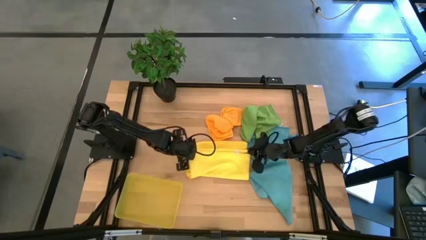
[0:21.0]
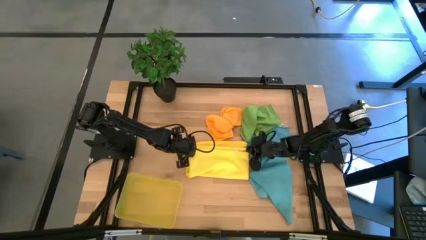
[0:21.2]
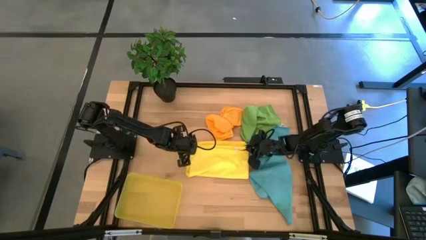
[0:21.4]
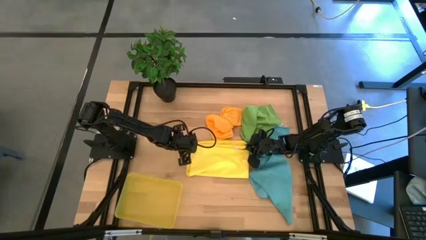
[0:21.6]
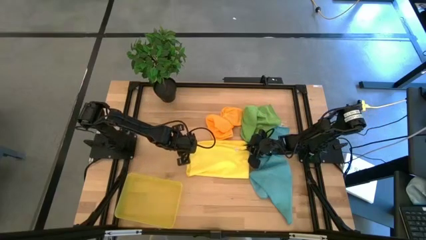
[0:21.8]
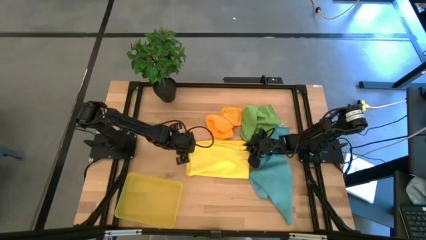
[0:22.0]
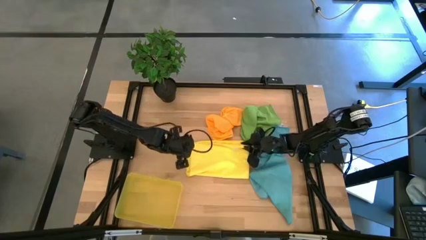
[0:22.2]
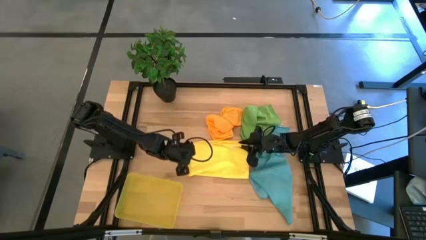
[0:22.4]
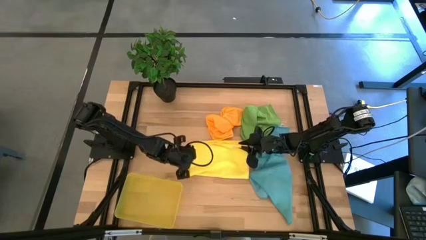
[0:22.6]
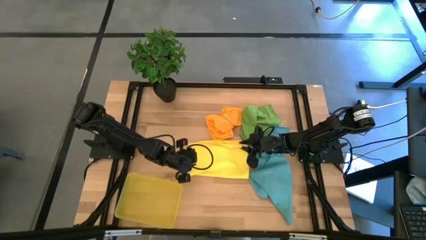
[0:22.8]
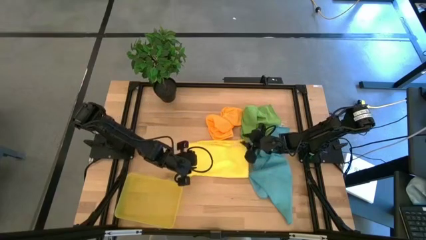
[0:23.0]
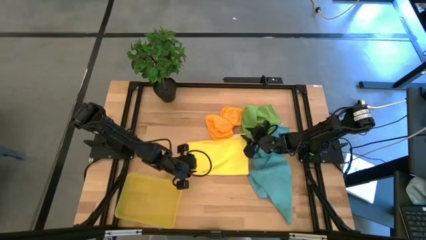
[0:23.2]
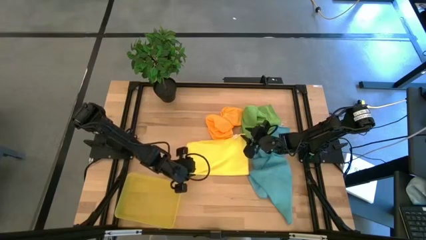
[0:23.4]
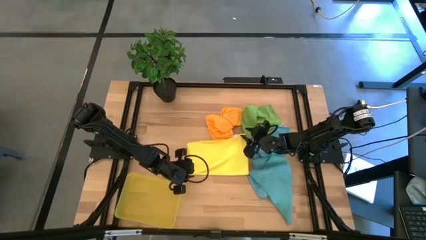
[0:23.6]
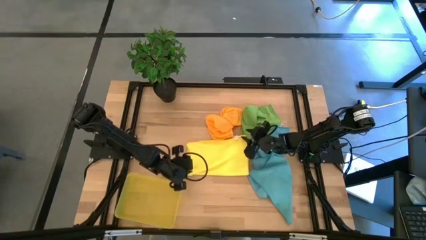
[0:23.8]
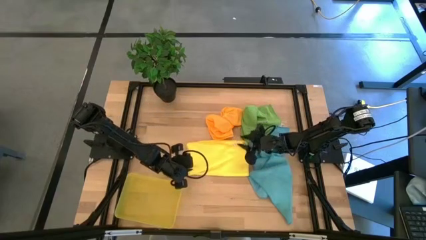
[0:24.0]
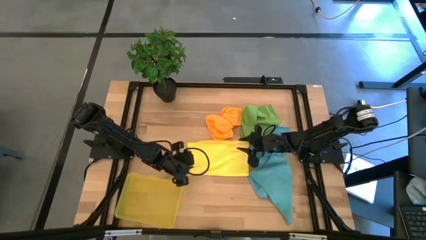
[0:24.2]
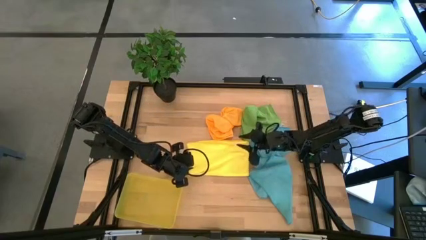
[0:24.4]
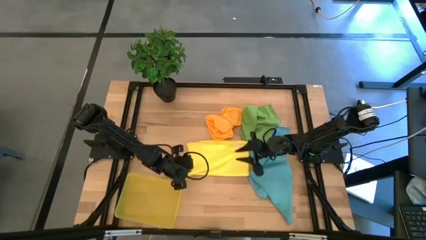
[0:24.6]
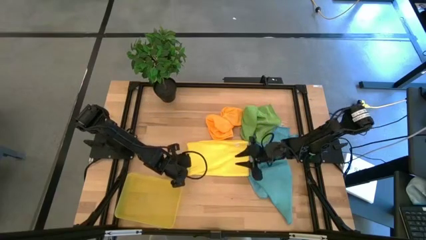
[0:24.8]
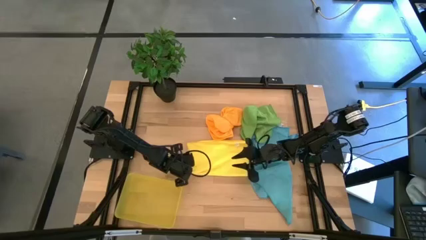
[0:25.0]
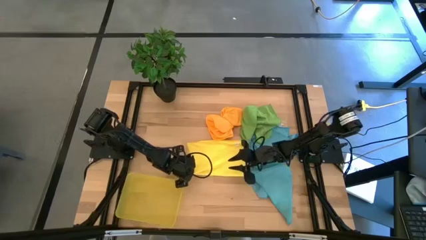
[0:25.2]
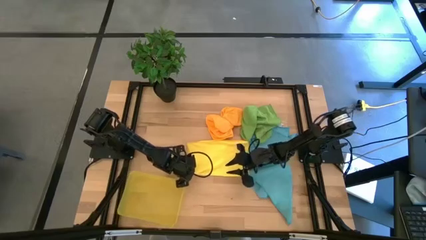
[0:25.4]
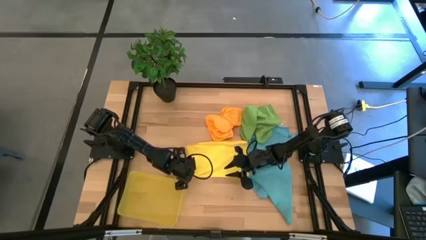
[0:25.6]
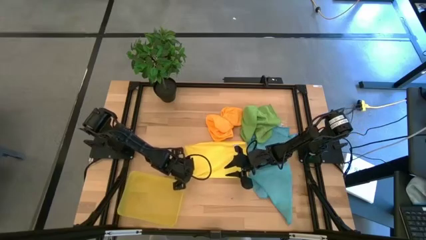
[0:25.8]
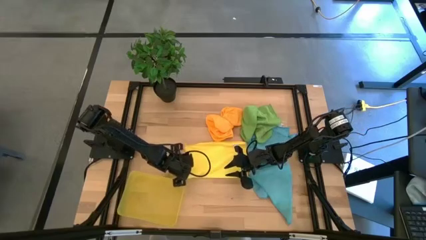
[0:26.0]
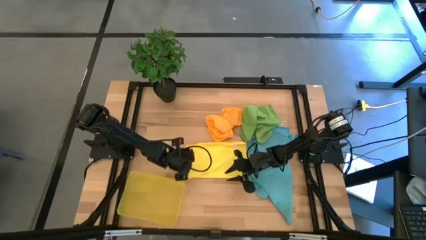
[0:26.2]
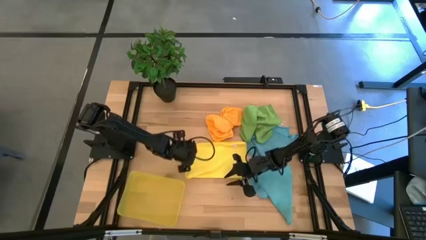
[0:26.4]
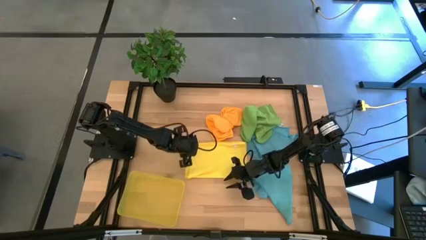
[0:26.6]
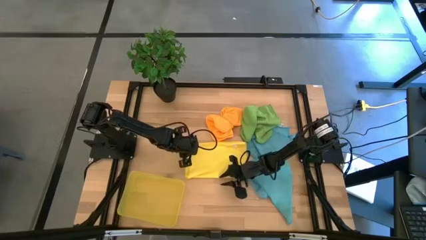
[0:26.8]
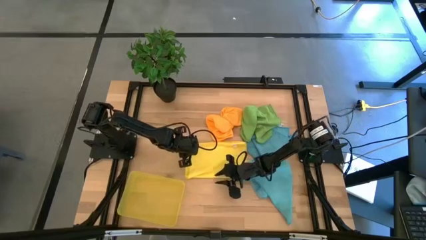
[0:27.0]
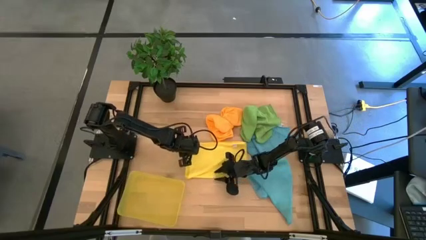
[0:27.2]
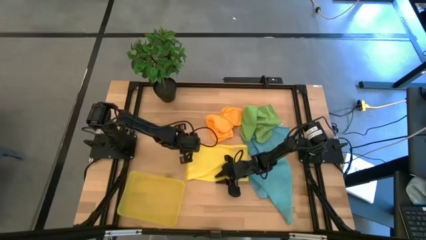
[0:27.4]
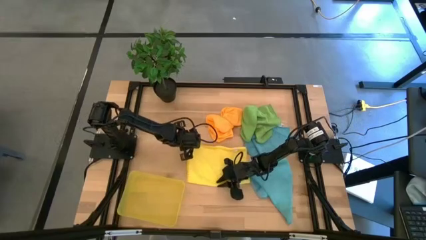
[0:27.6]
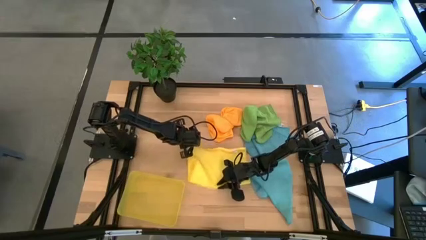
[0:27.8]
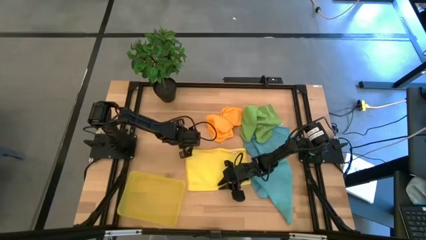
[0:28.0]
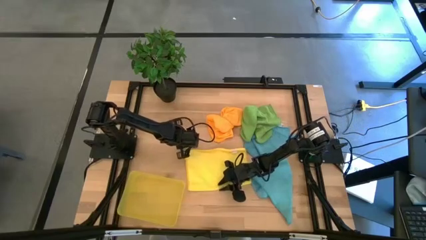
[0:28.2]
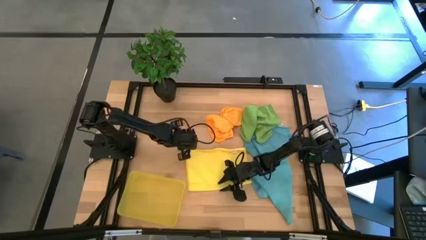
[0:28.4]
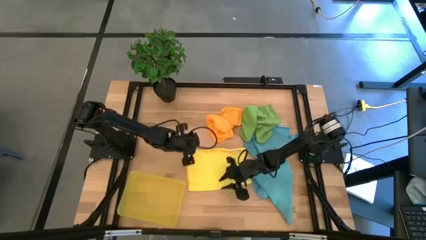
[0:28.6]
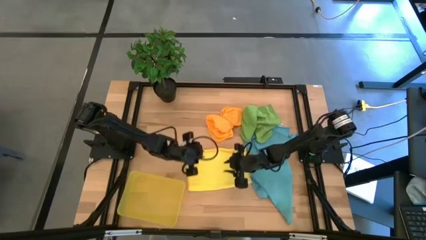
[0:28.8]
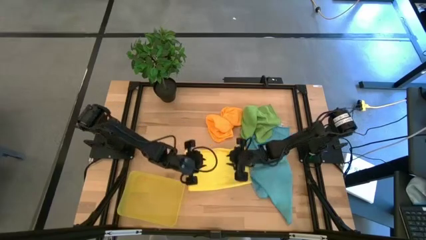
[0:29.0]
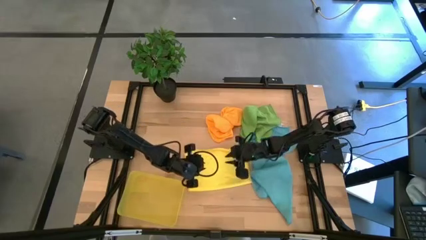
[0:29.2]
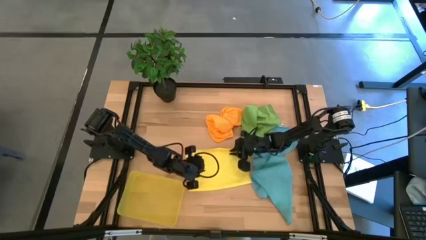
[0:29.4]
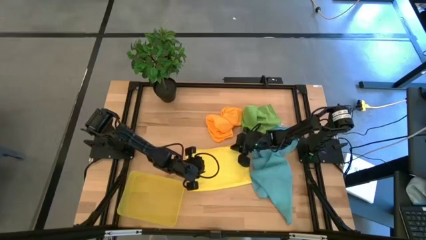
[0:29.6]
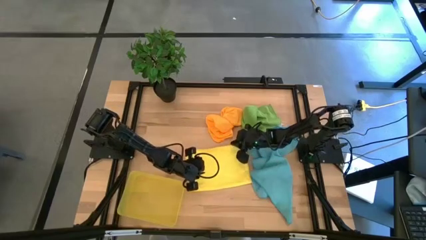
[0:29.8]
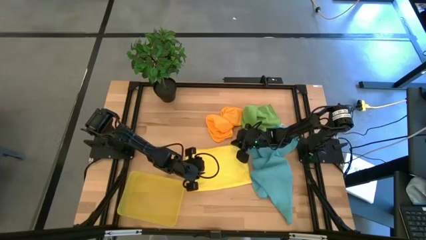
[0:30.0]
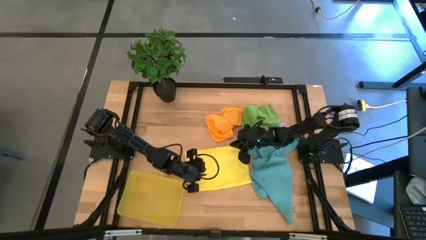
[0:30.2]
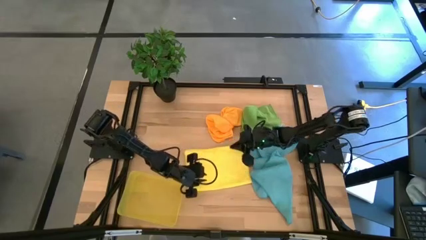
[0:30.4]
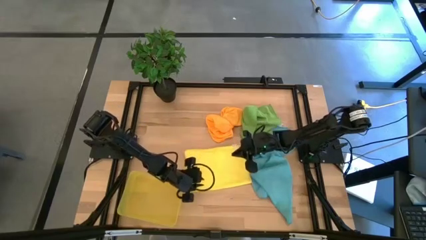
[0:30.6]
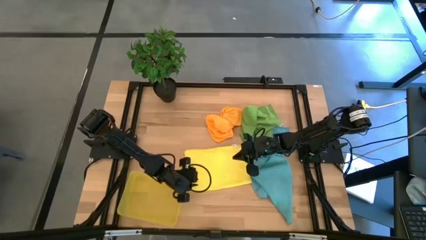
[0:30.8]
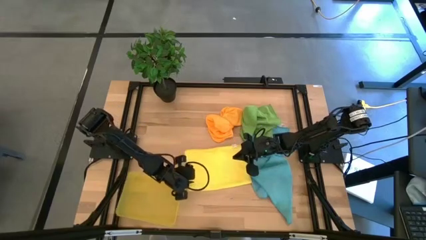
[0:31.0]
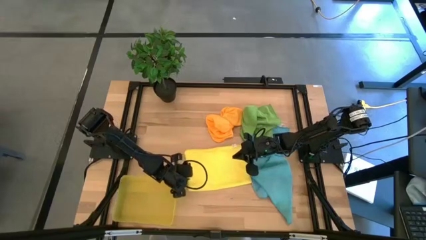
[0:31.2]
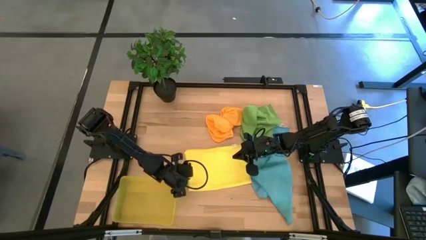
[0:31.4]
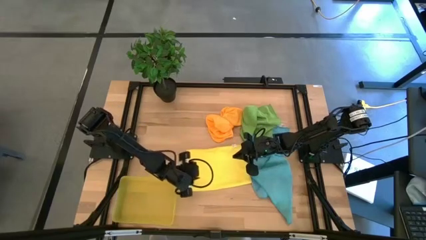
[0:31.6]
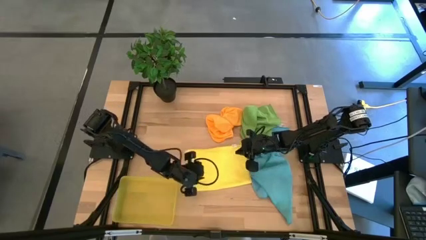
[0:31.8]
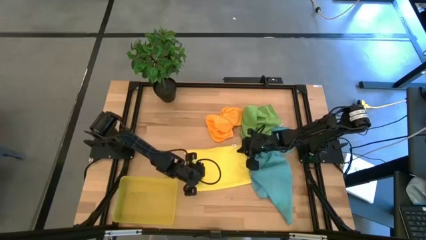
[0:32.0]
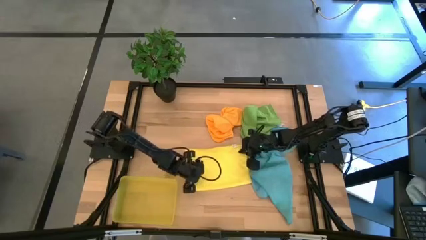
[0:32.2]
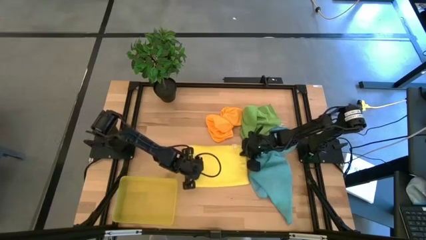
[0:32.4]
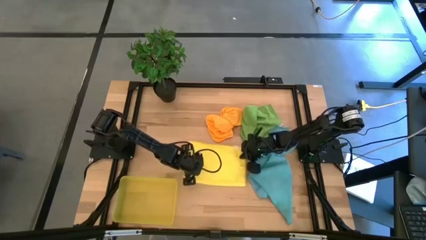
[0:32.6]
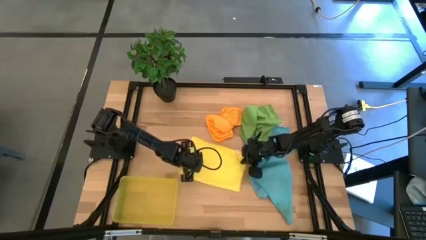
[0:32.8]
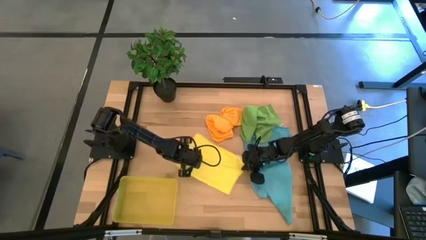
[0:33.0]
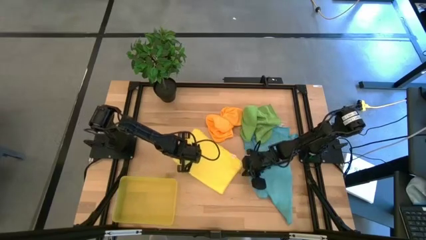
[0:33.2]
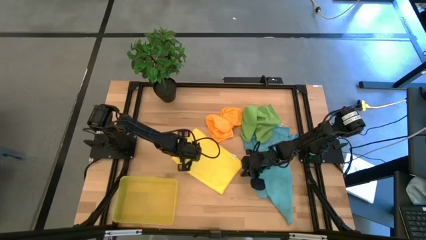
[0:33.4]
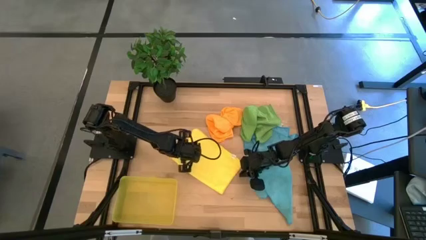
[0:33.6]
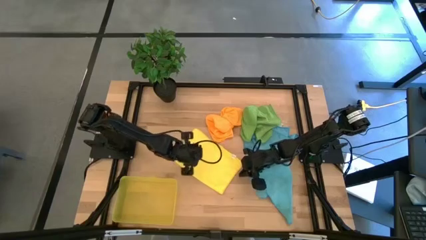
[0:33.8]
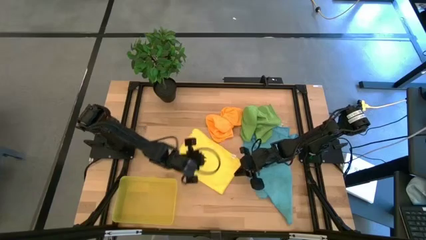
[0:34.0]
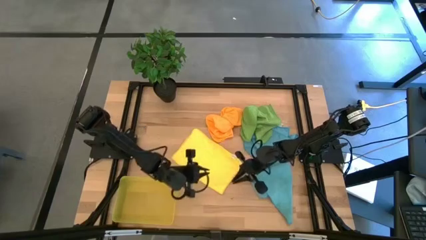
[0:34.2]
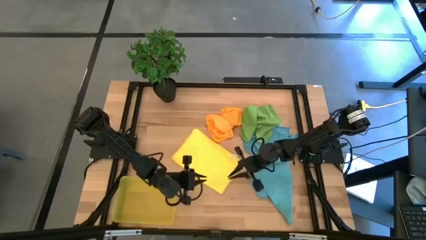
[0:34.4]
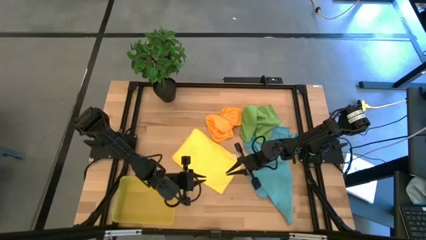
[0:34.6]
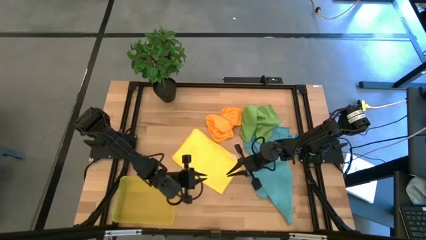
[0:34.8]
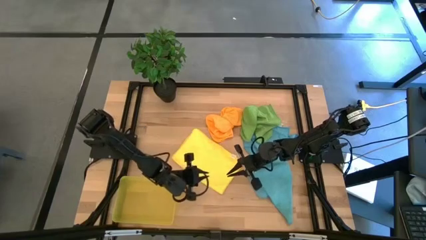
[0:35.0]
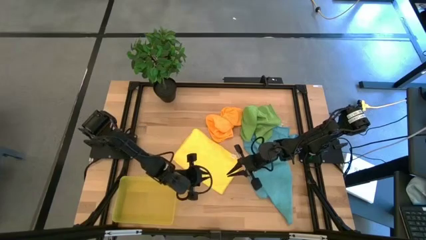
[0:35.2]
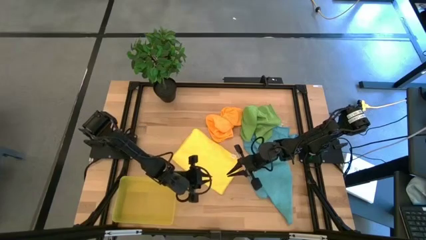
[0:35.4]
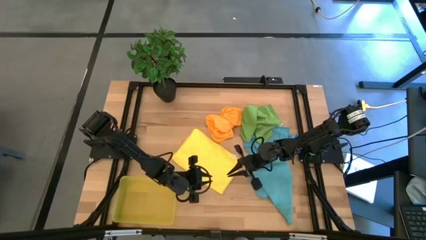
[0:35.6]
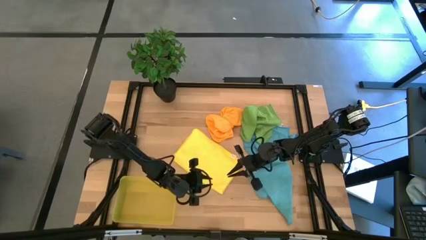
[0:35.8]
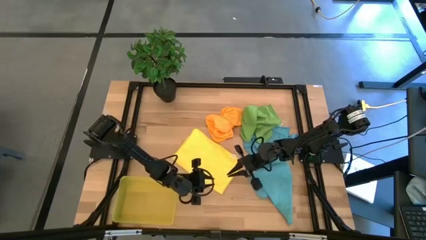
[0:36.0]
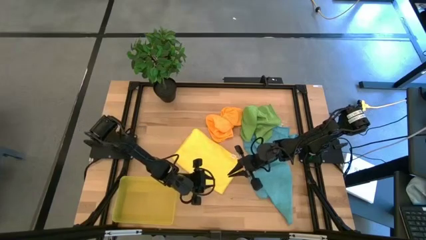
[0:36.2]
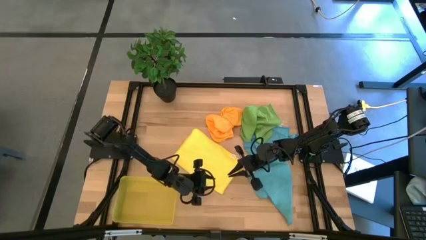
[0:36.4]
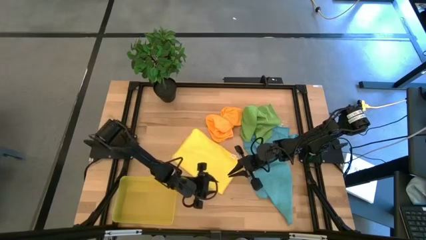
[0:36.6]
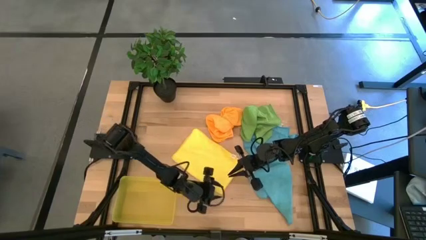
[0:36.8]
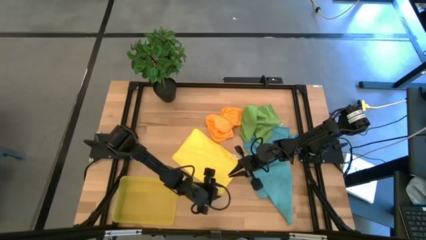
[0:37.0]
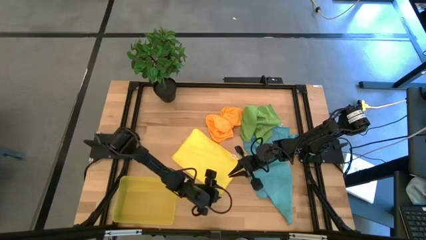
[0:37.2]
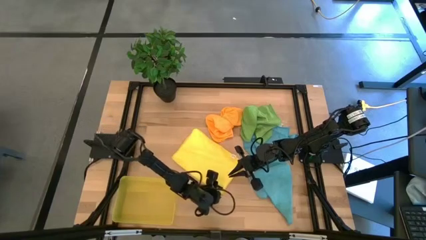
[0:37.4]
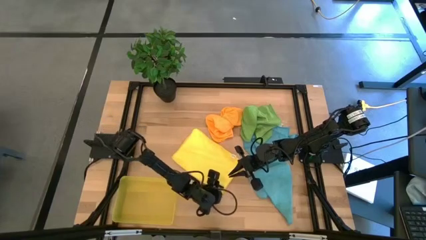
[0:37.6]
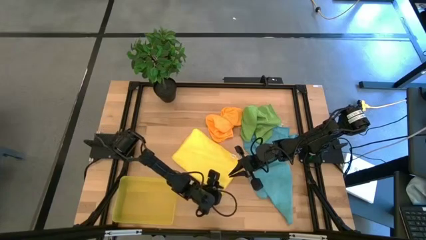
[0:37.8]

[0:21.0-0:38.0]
Task: Fold microfiber towels
Fold the yellow microfiber cloth
